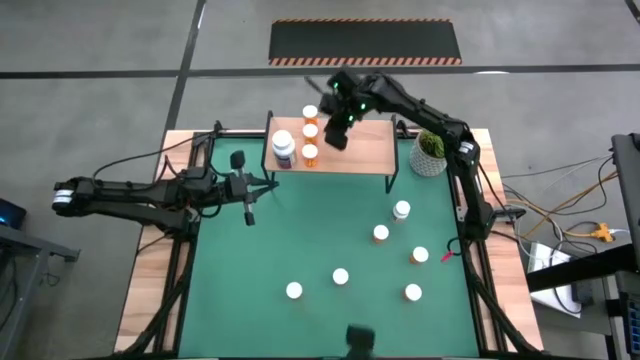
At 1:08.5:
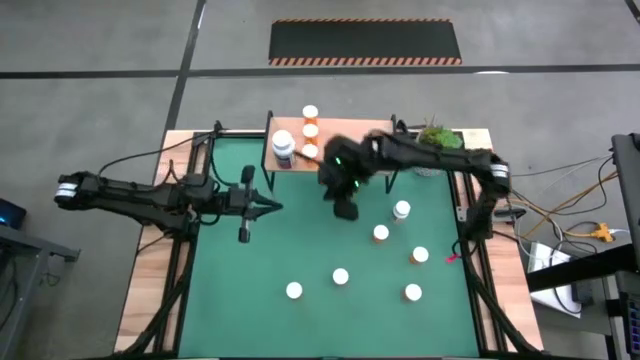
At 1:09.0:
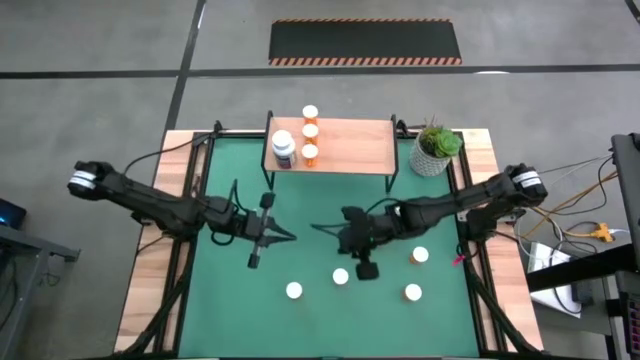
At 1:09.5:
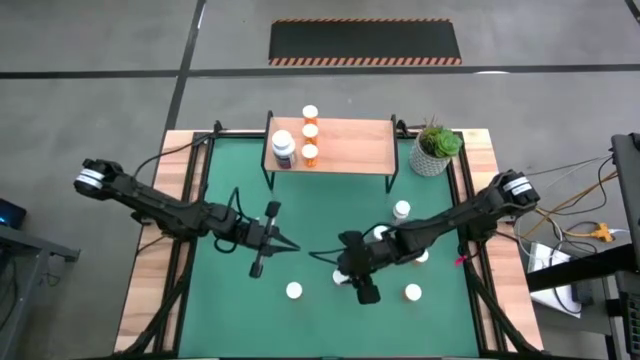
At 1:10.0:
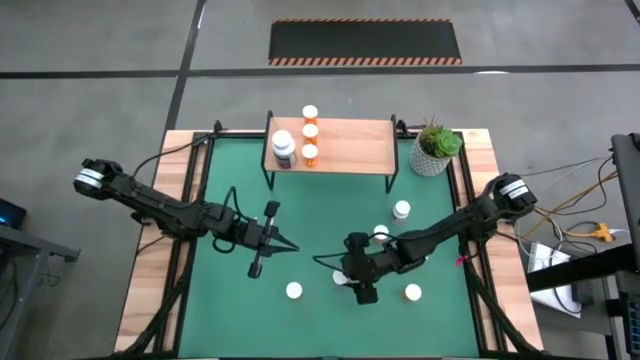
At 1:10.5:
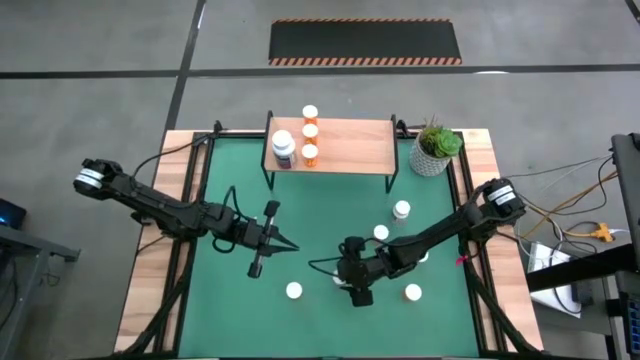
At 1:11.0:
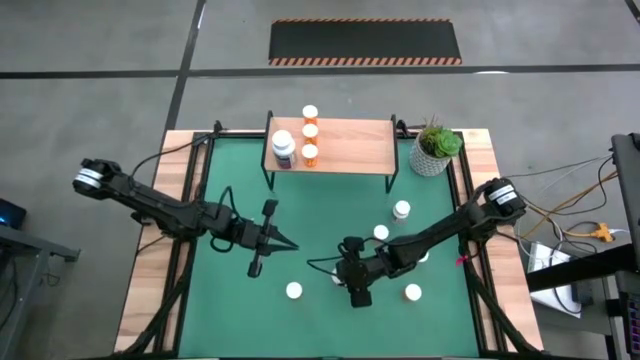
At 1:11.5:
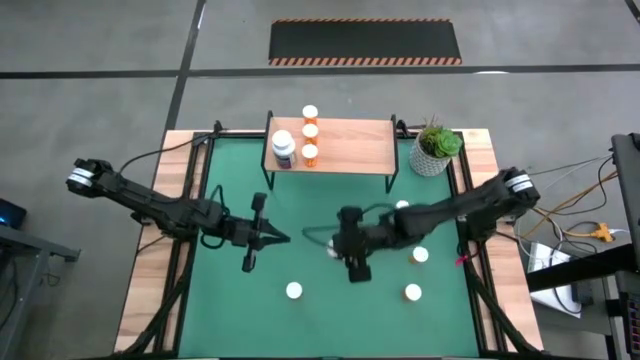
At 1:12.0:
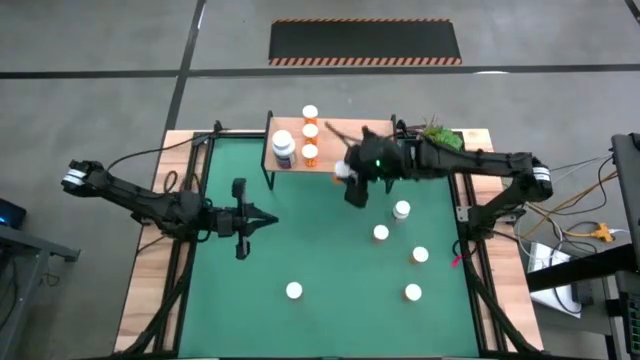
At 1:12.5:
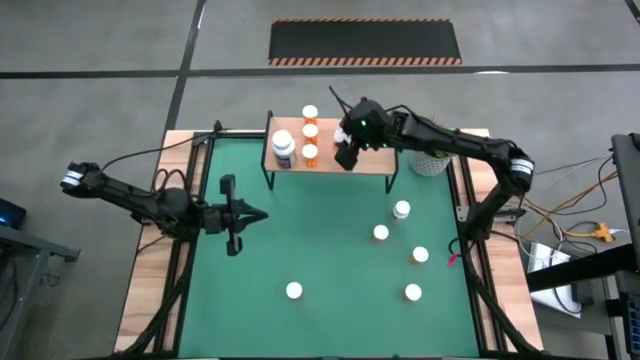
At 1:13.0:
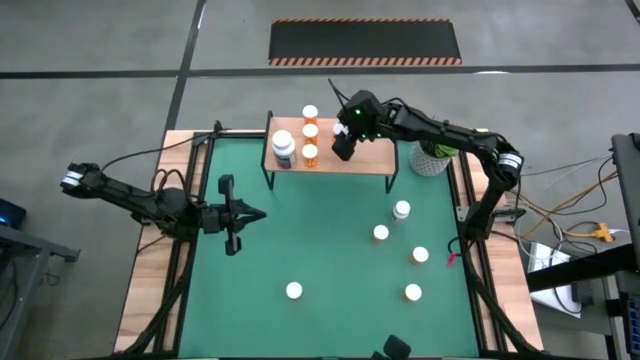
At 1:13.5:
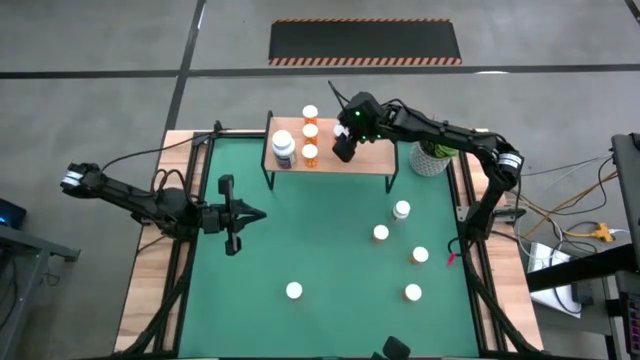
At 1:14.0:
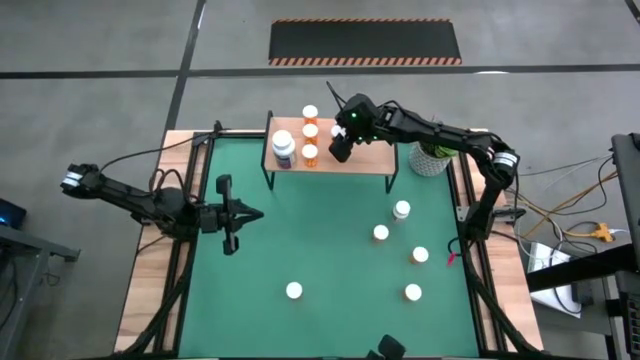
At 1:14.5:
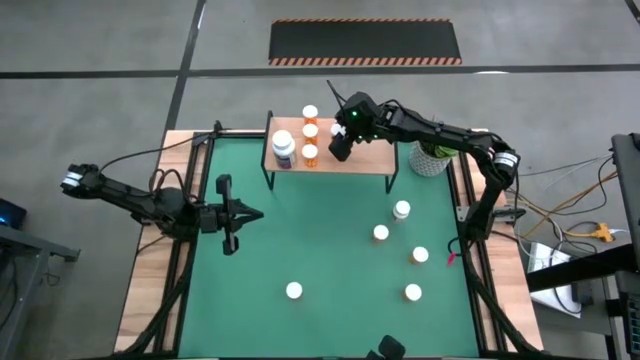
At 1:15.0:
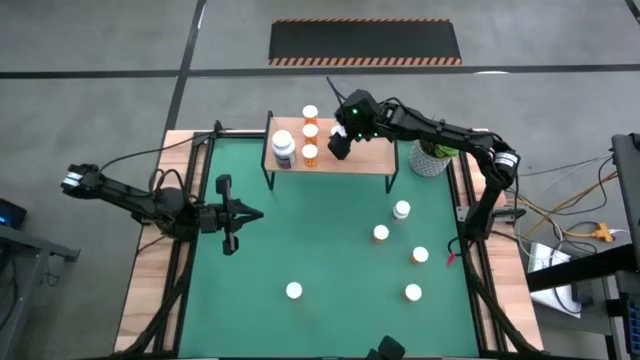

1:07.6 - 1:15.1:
Task: Pick and place medicine bottles onto shelf by color
Put the orange pill bottle on the shelf

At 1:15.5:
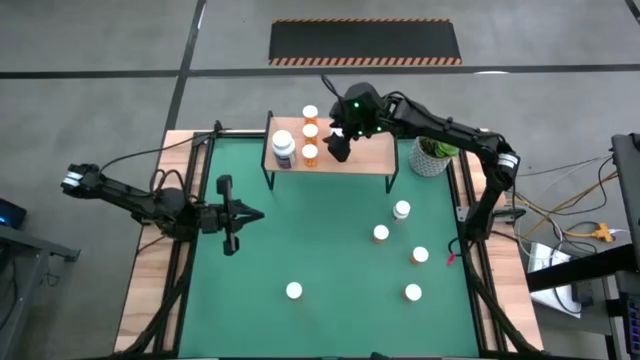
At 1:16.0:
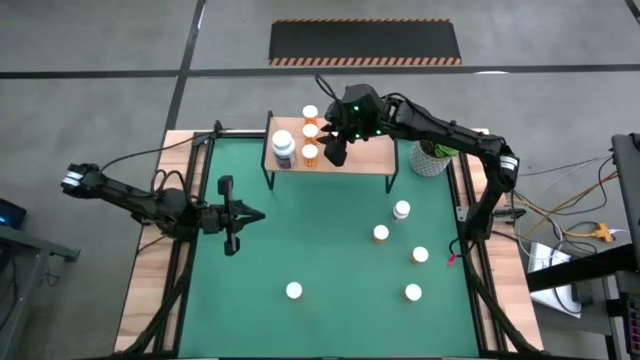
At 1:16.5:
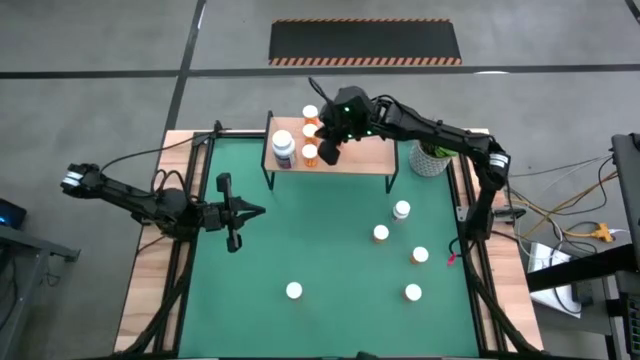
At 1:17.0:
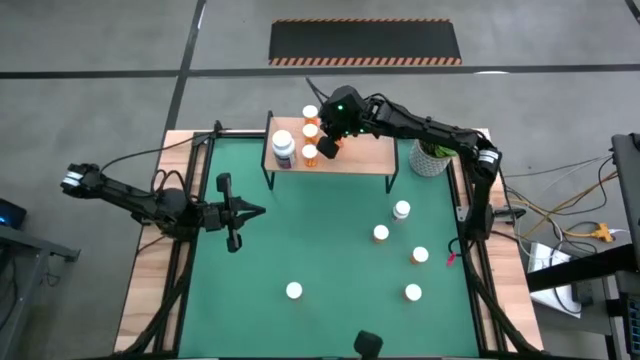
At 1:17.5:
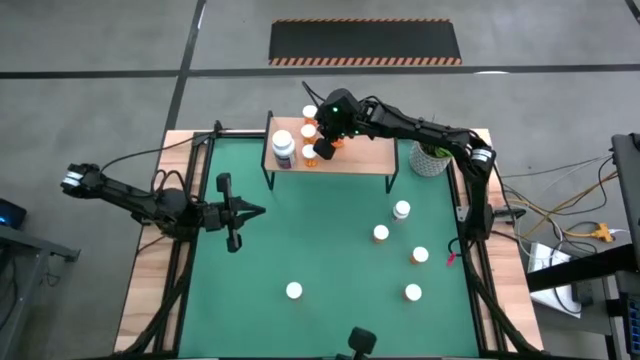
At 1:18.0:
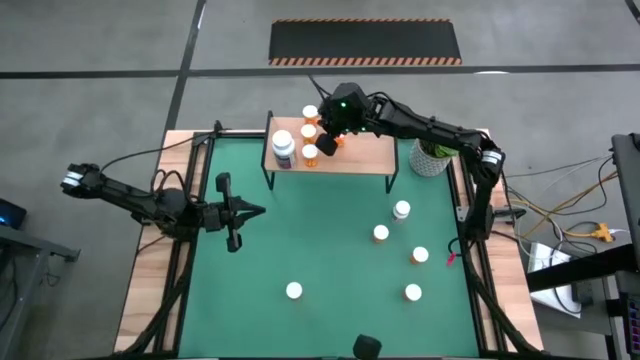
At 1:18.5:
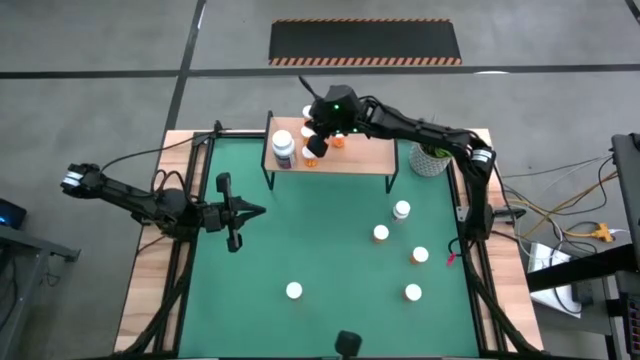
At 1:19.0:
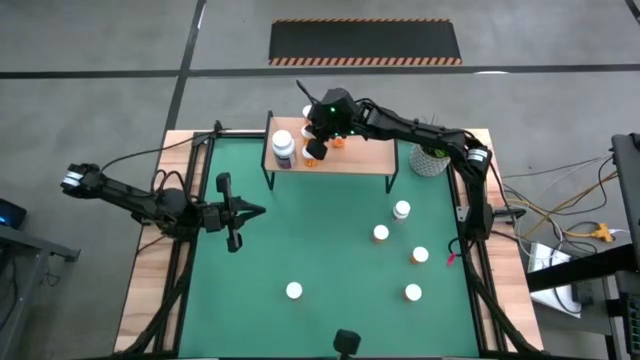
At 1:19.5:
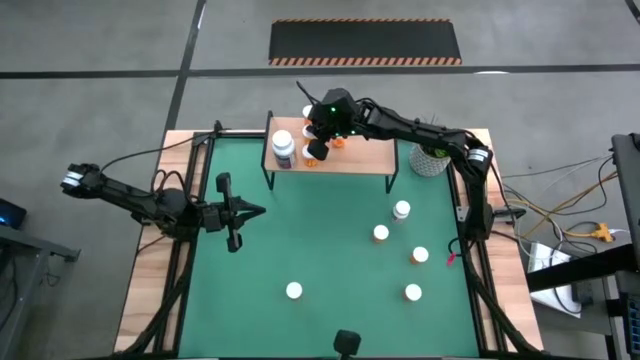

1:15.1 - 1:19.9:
Adjust the orange pill bottle on the shelf

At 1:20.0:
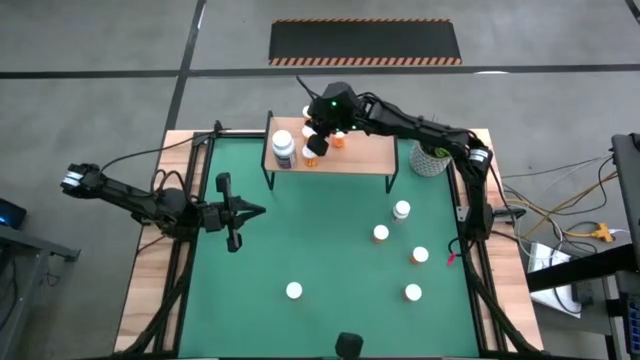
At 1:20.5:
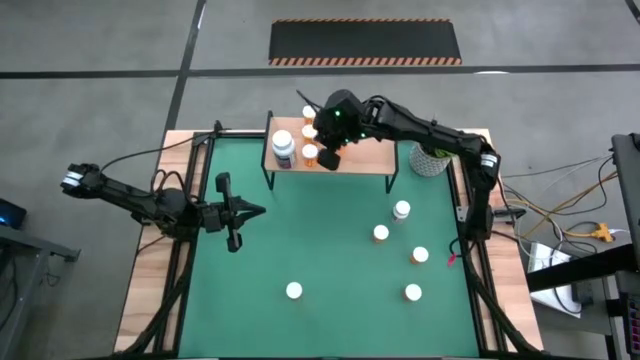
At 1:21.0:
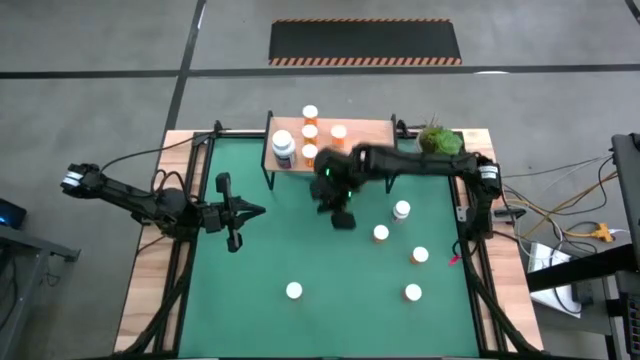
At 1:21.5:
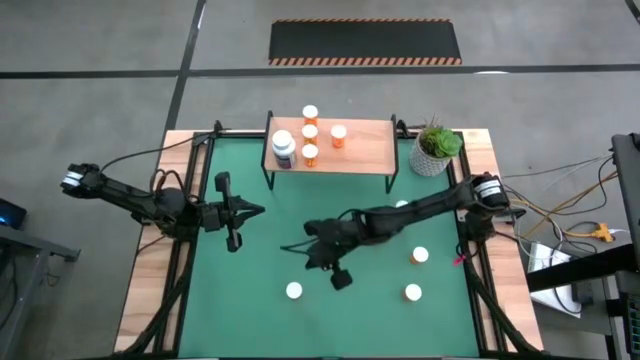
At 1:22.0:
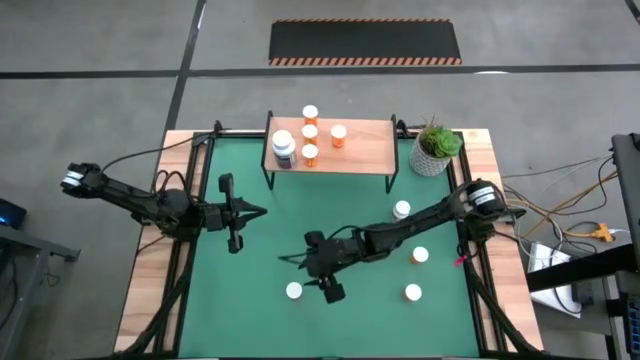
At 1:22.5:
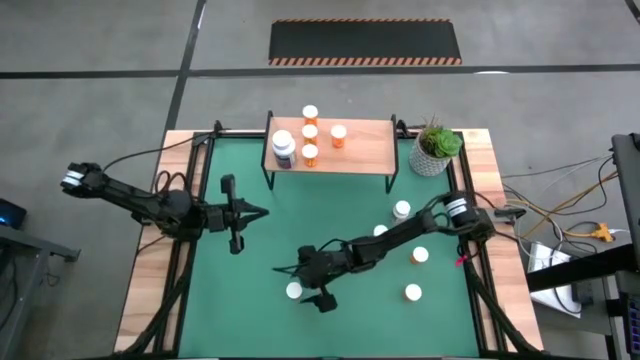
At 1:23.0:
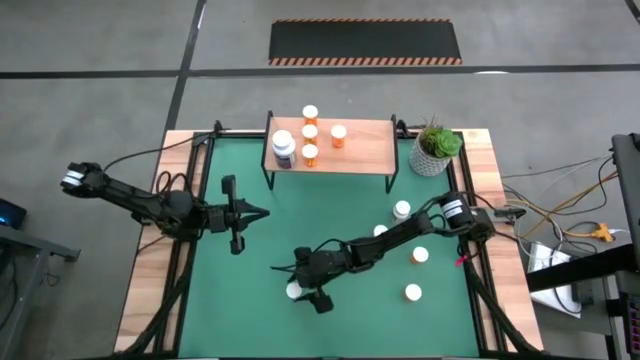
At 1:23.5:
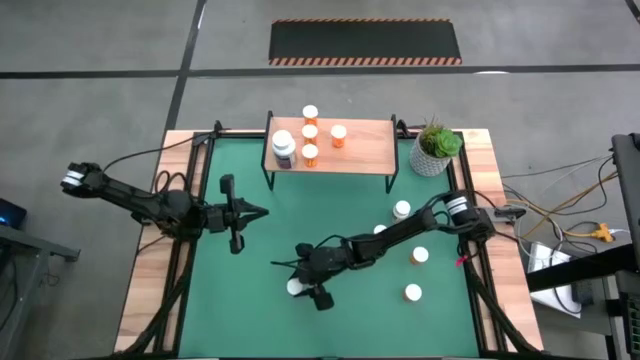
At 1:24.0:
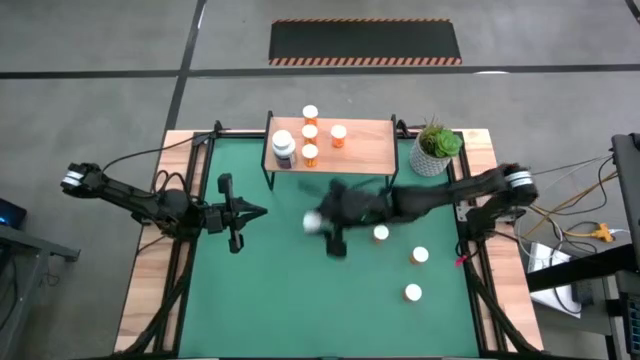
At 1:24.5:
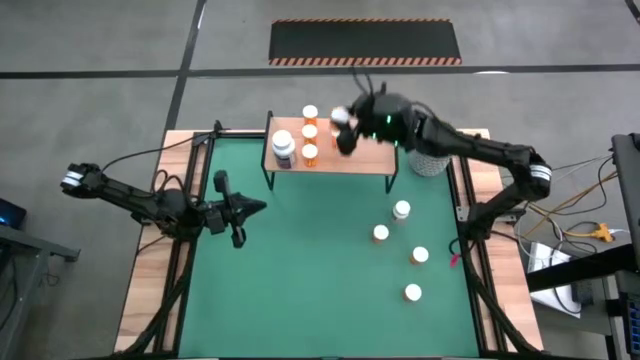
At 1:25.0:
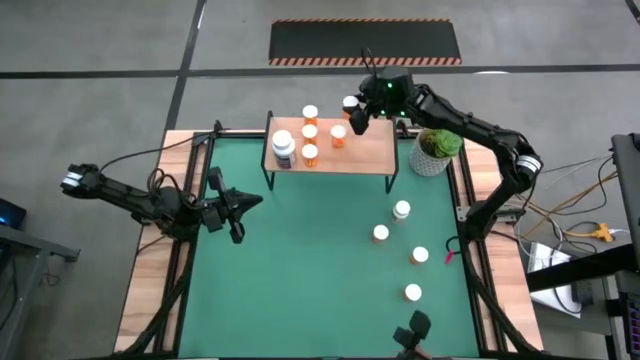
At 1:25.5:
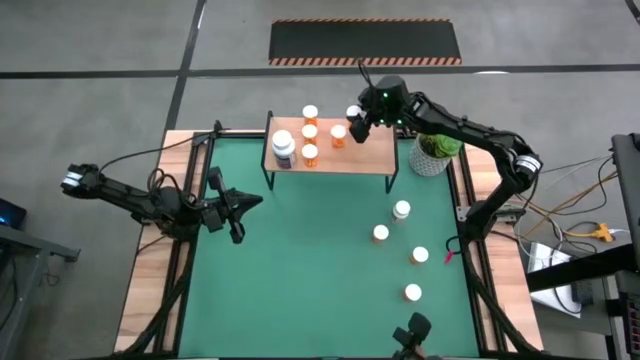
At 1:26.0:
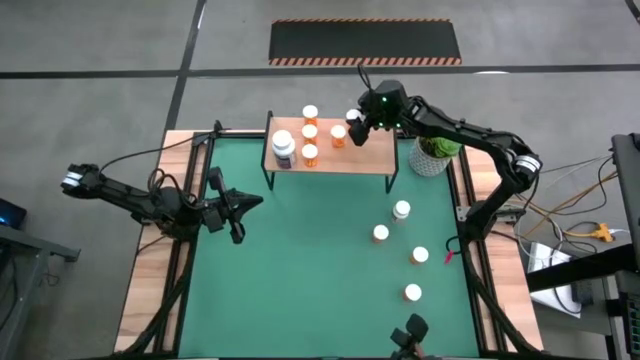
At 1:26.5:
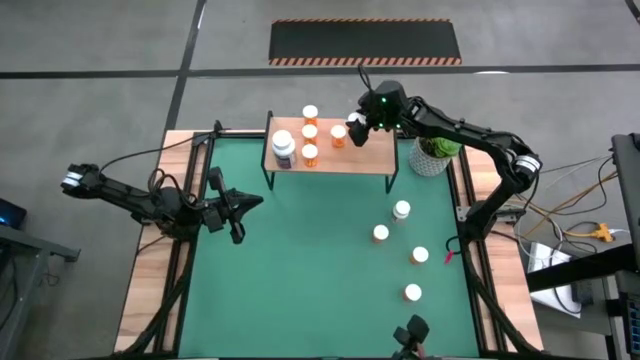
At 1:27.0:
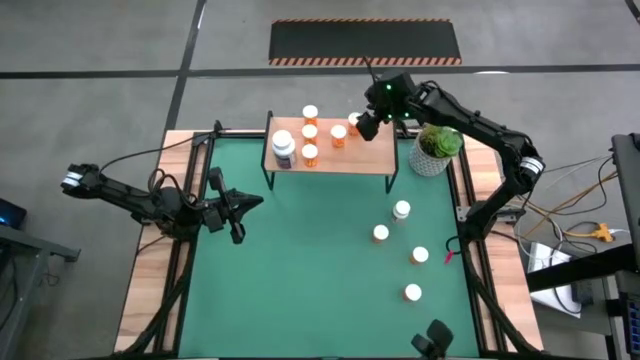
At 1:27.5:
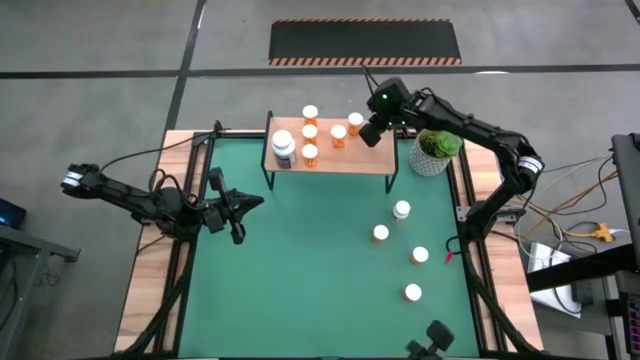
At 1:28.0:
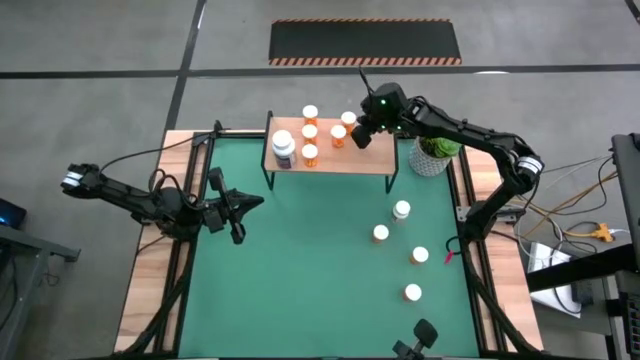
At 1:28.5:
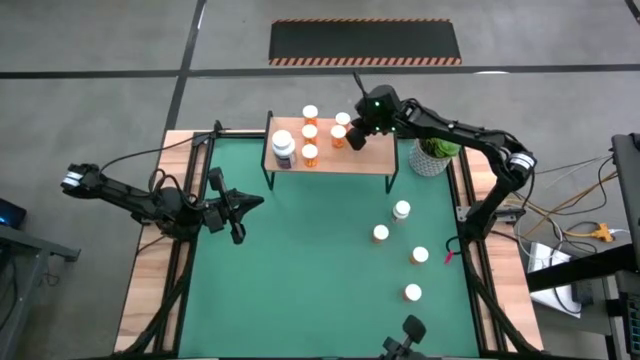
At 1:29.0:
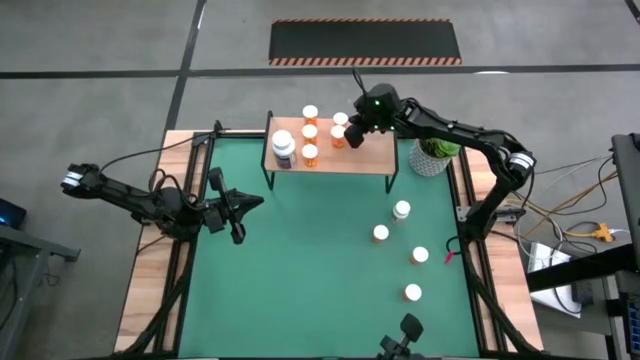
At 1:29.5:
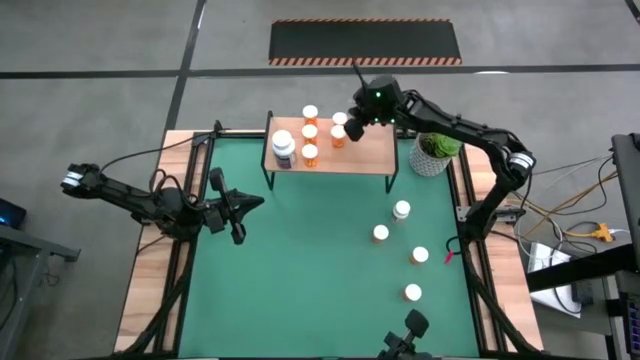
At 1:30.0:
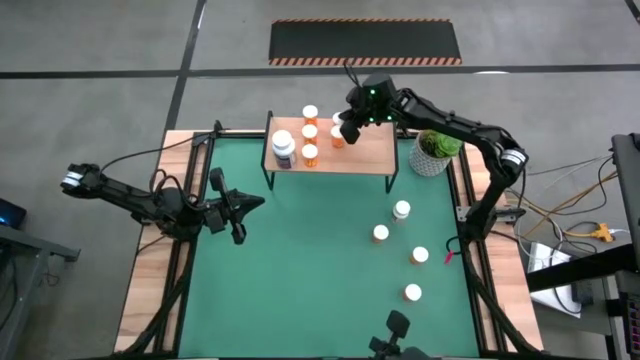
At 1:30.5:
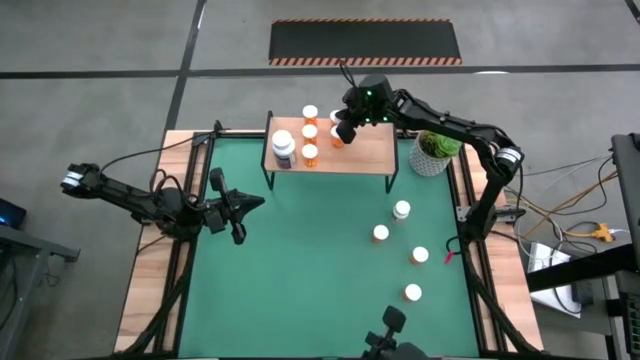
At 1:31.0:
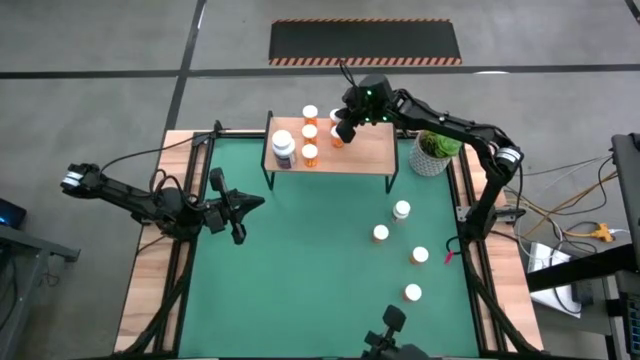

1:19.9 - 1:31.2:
Put the orange pill bottle on the shelf aligned with the other orange pill bottle
